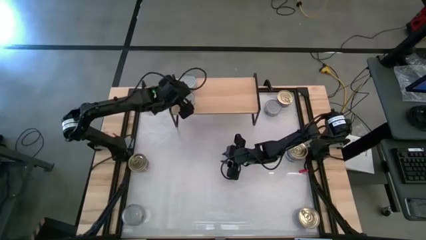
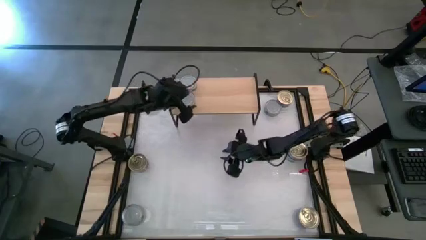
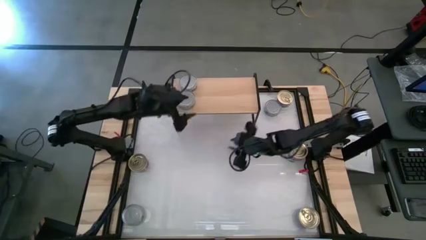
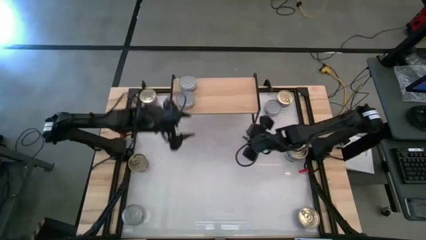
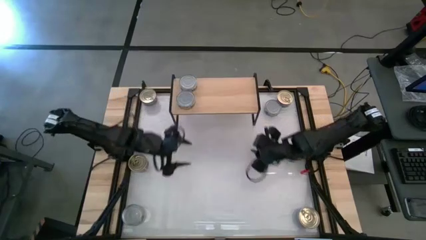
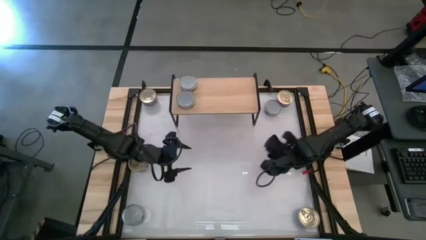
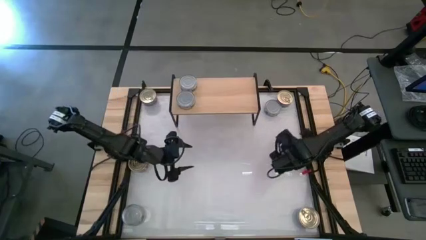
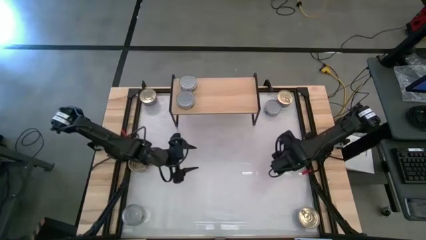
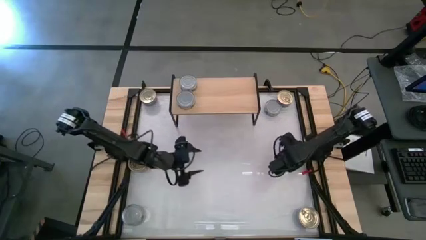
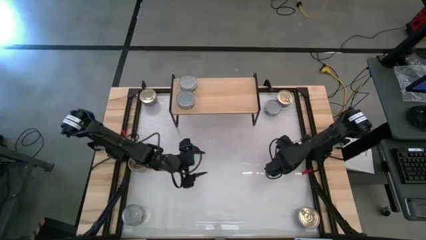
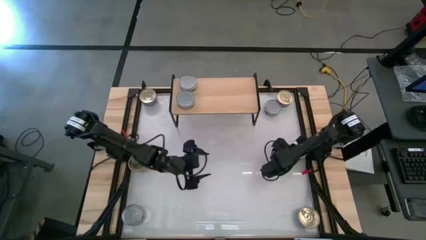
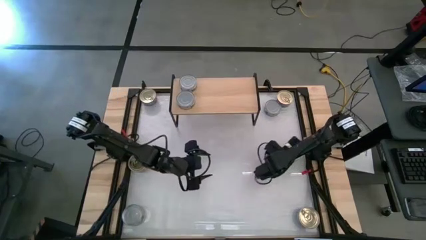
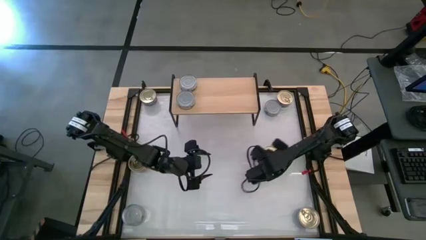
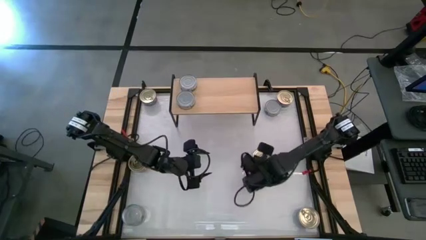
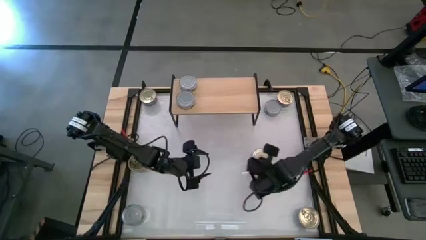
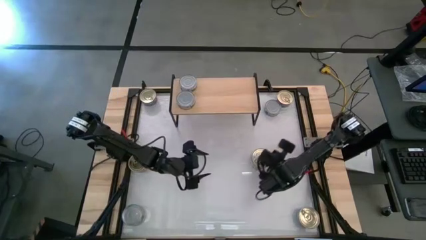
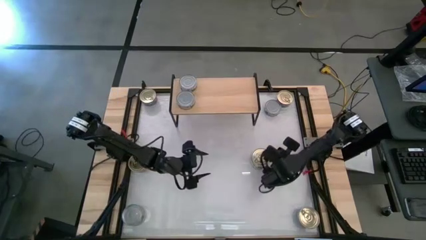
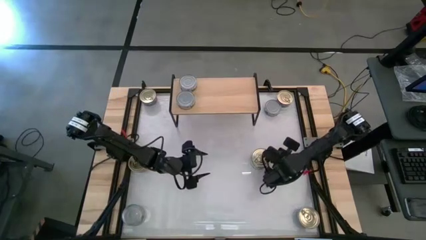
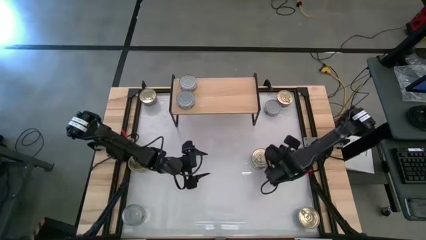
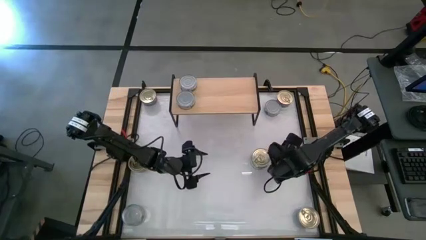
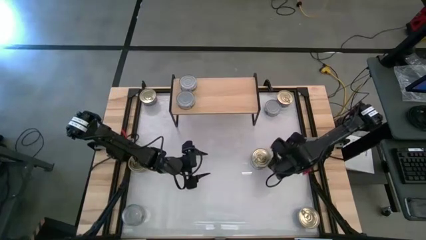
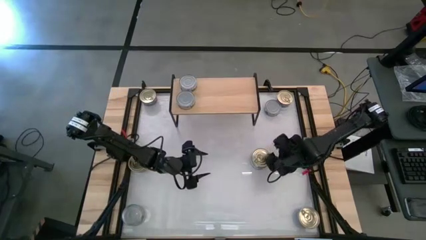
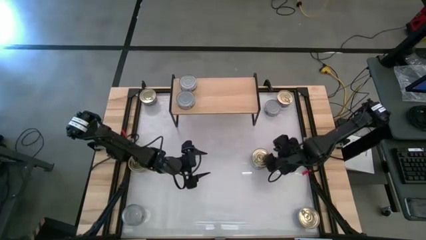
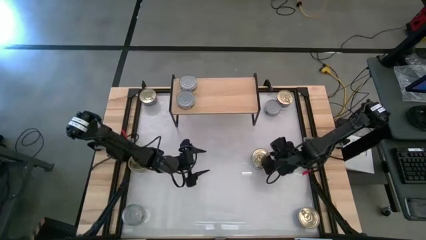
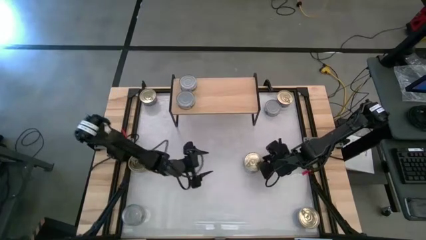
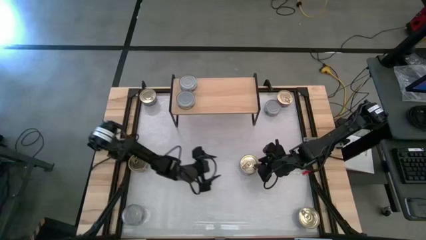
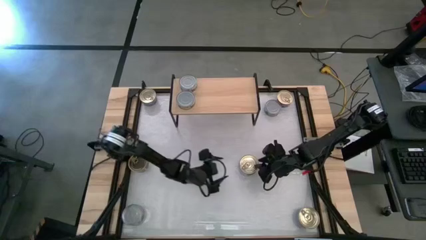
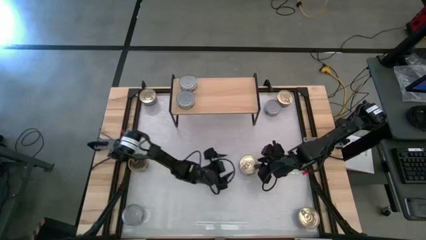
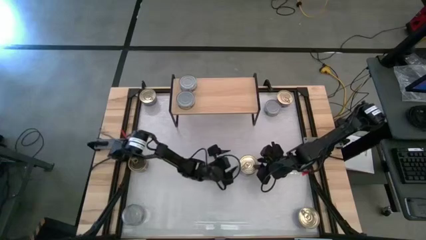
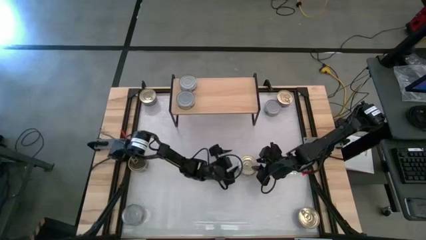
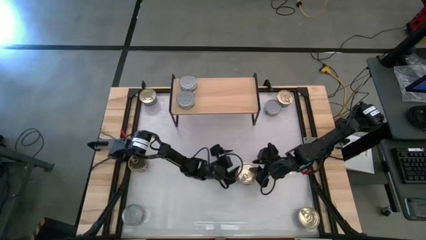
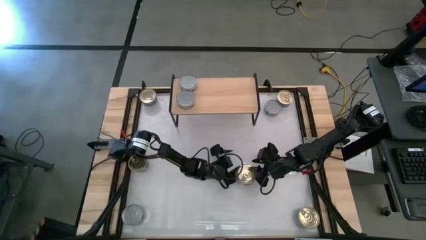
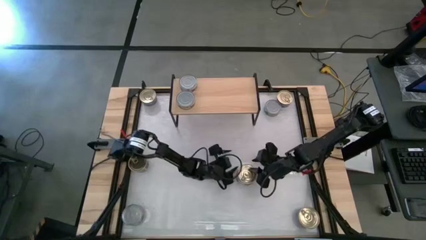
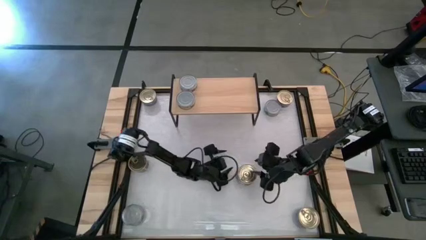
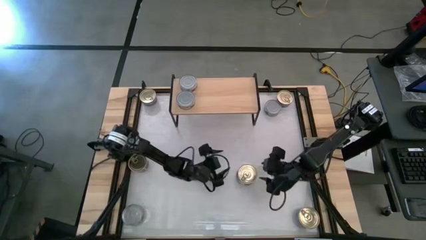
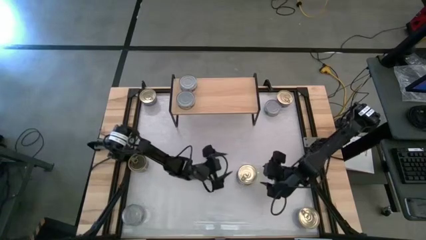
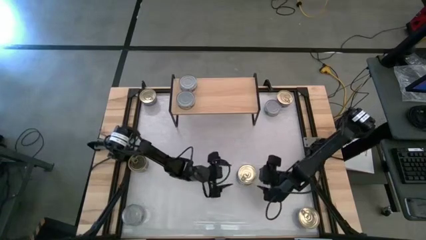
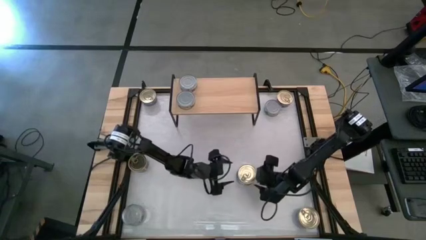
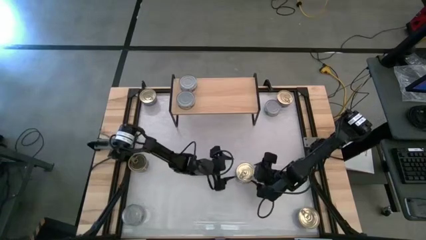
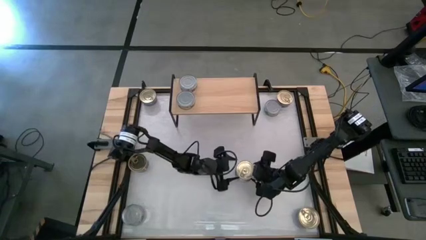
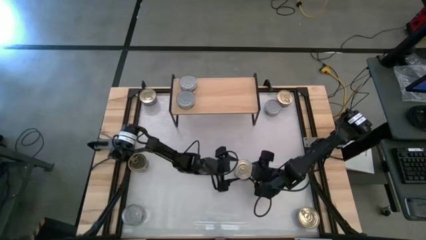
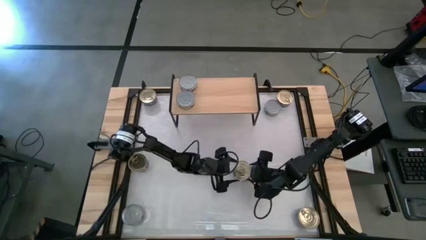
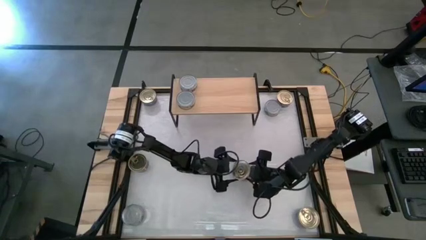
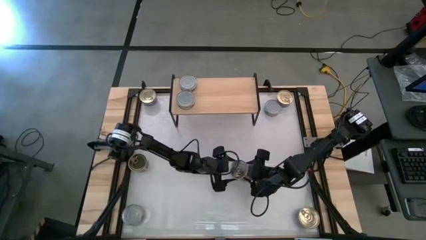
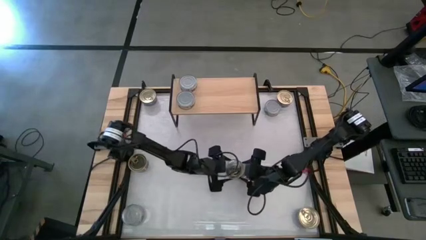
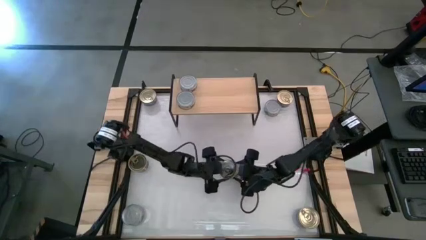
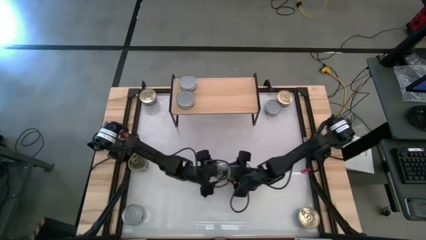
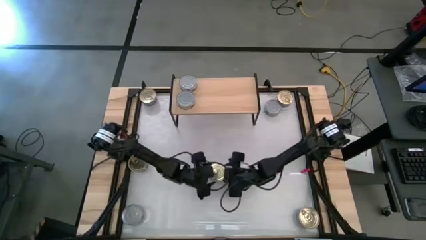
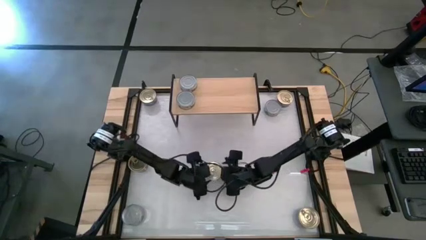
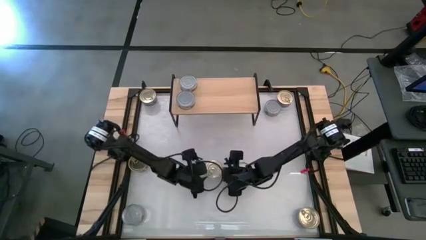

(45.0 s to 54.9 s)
Task: Stack canned seafood by type on shelf
Remove the blue tuna can from the green tuna can
